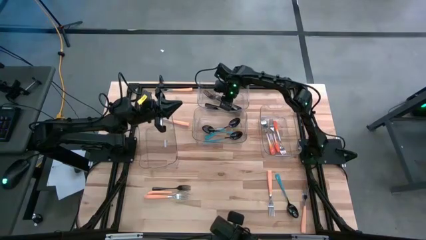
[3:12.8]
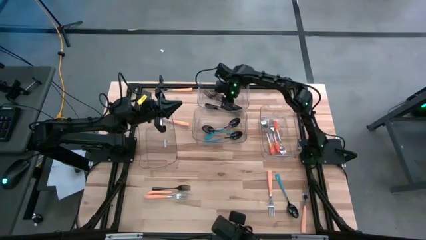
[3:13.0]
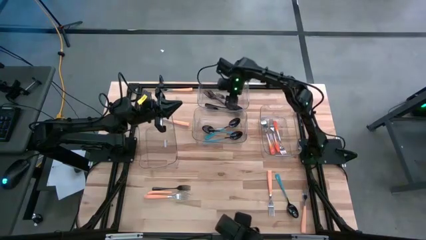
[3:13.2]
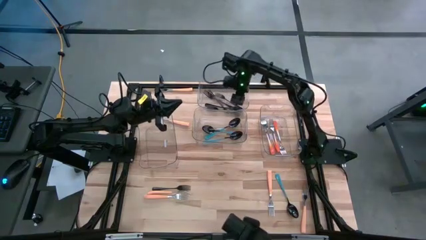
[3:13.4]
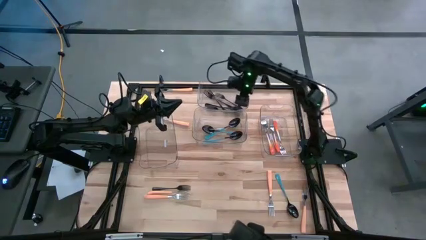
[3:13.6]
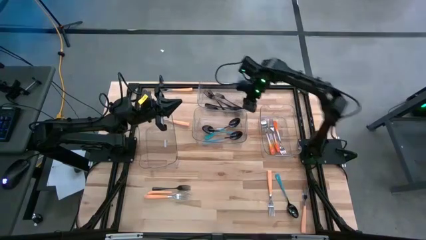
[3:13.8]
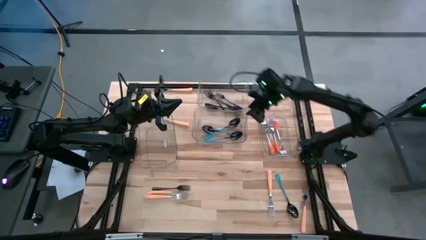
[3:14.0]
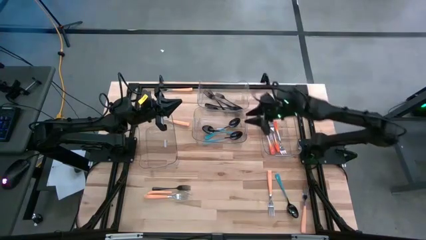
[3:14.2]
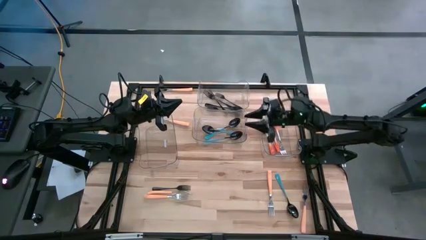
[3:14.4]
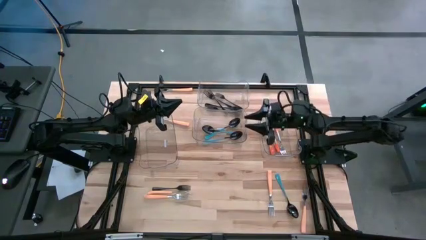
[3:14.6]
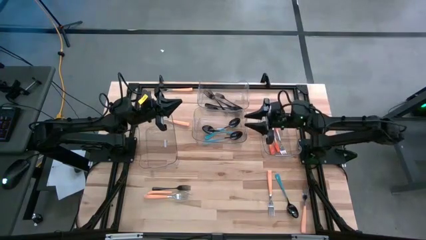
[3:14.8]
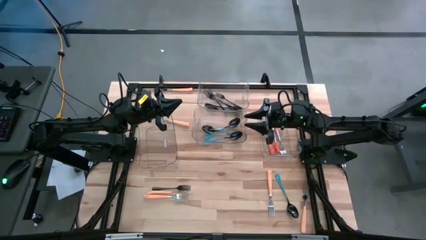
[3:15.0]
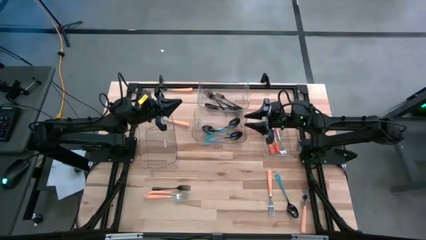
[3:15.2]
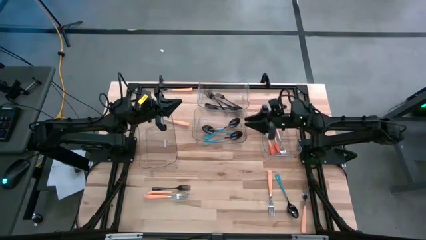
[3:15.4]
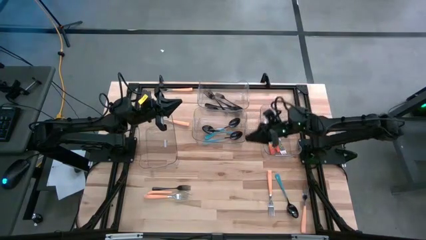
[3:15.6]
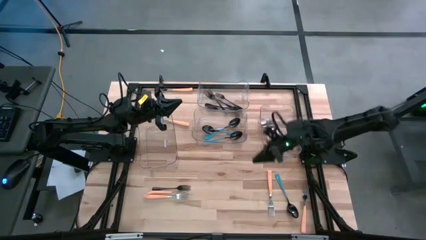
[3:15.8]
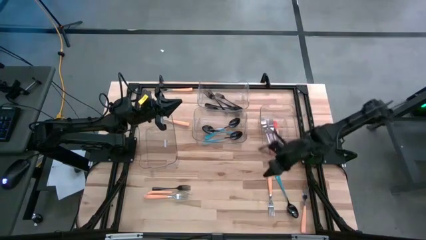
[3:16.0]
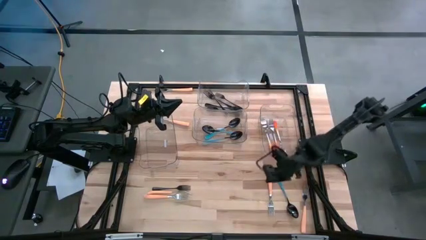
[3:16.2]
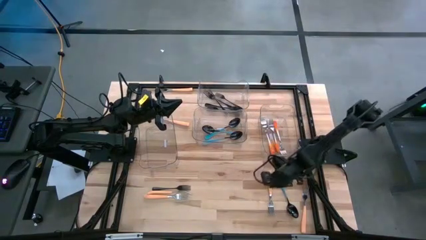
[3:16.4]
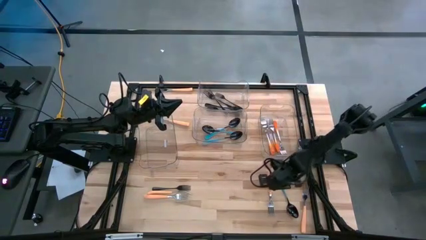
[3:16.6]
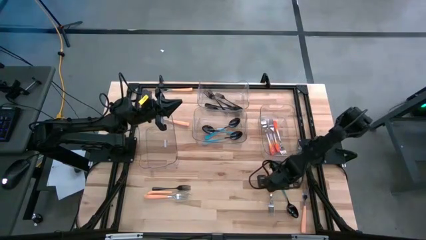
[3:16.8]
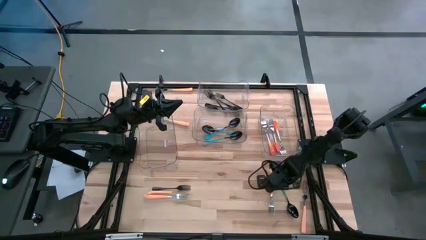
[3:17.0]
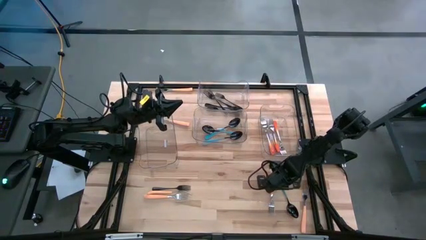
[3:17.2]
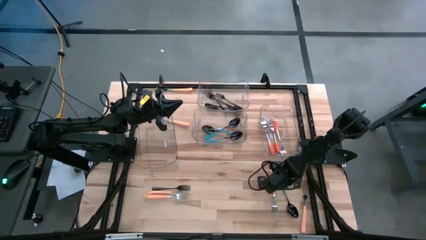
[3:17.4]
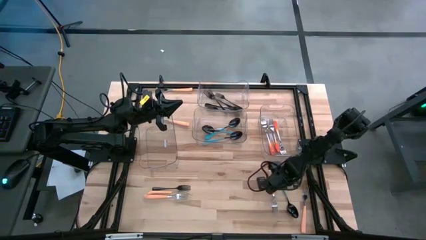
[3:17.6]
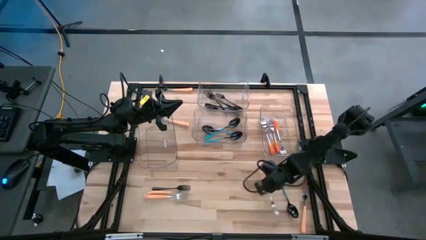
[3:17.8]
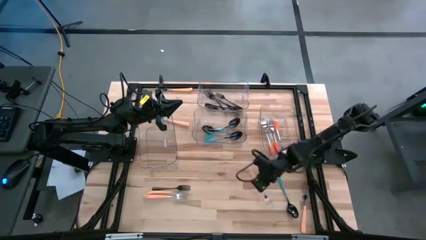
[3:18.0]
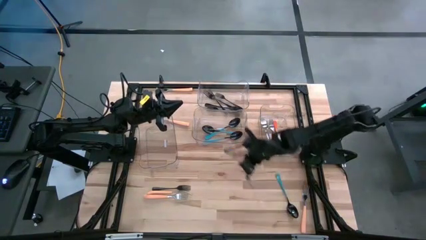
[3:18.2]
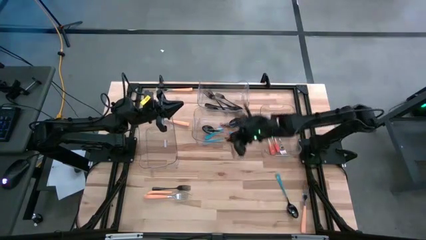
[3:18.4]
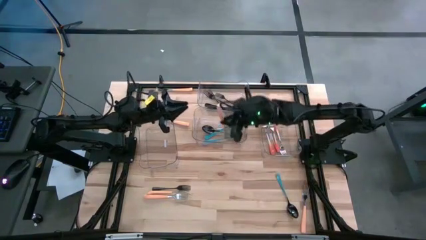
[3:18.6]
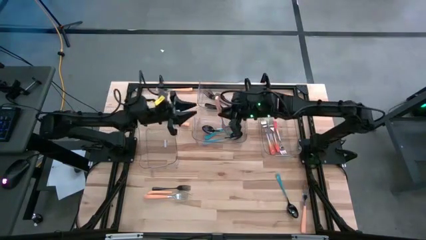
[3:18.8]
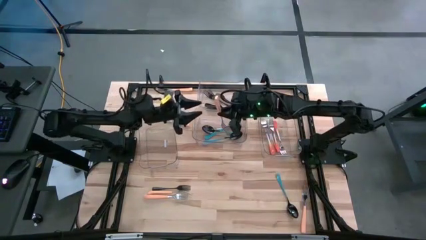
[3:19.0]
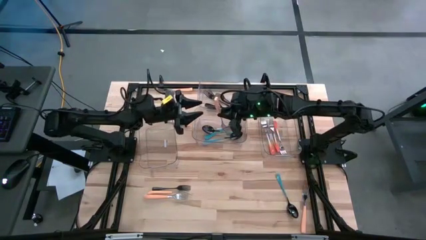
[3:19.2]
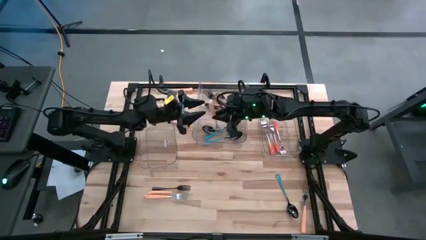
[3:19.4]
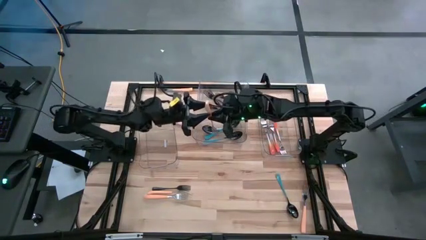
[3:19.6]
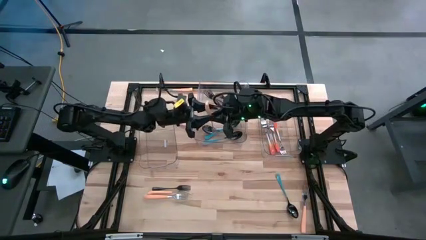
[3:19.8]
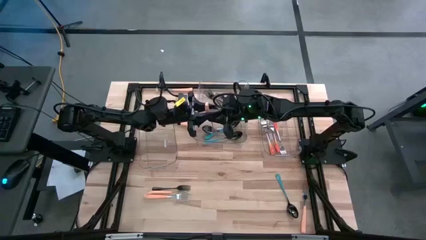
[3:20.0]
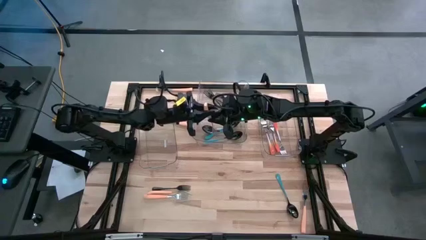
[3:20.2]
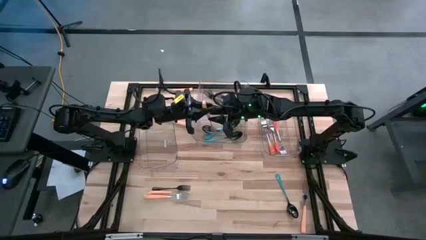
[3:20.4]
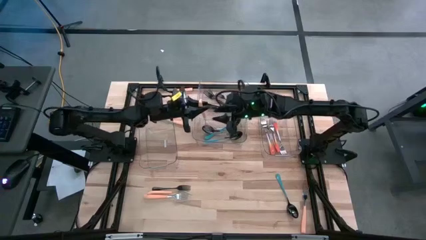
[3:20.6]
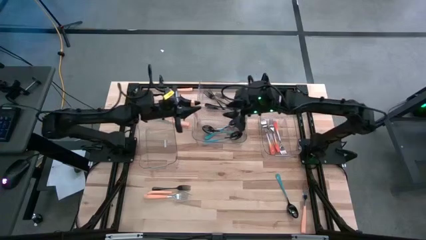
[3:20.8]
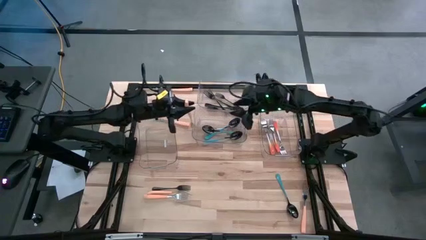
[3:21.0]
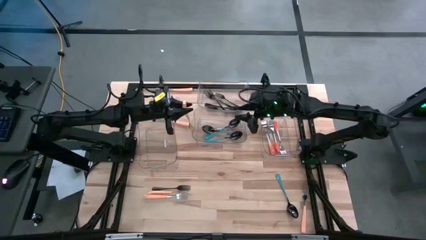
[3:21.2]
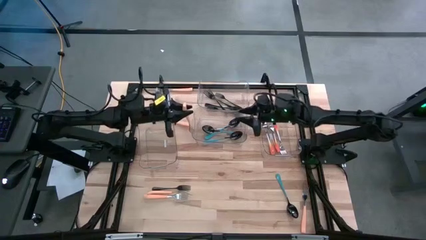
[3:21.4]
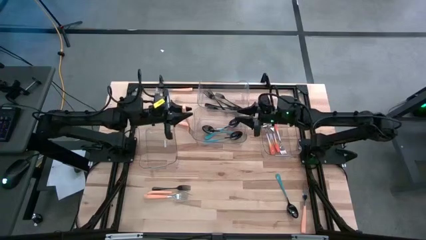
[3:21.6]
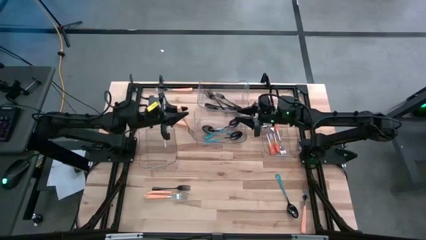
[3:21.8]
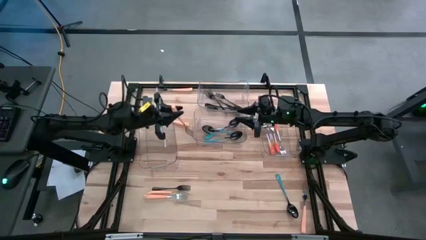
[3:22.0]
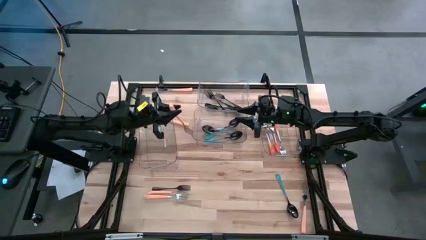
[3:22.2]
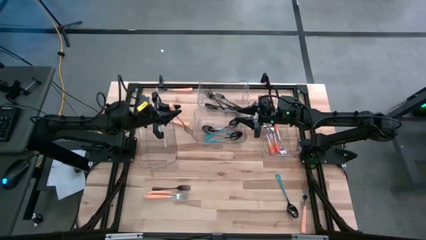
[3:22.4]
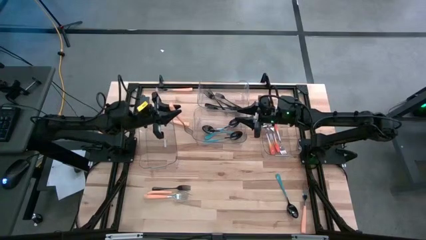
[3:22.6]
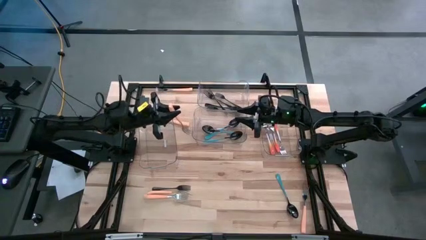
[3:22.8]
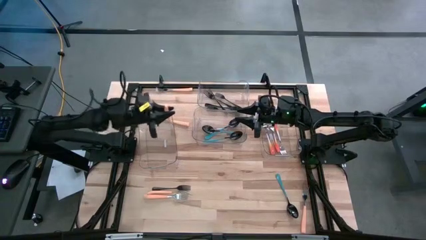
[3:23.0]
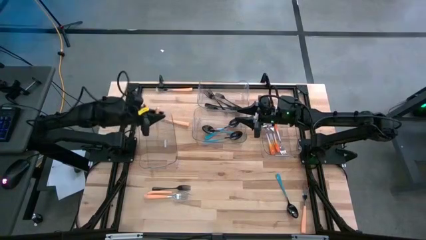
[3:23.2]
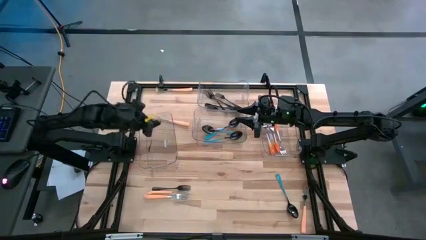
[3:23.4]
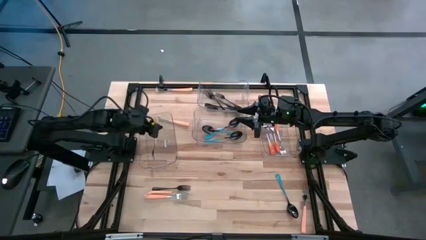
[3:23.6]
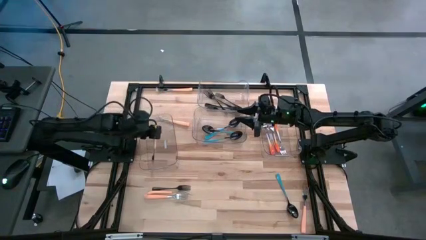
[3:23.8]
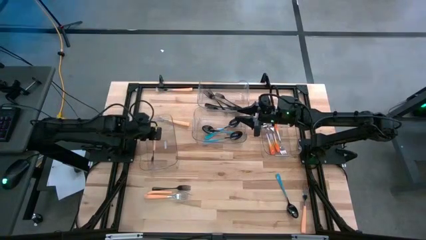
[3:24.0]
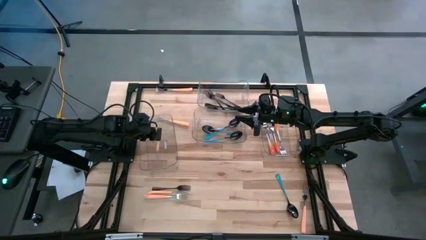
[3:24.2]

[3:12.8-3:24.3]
Task: Sort silverware by color (type)
Put the light orange fork into the bottom left transparent bin
